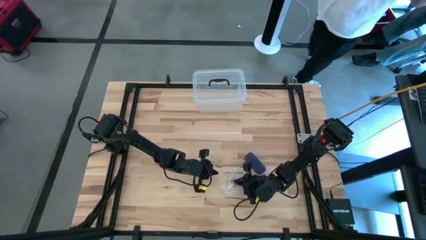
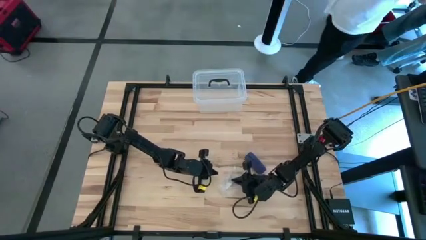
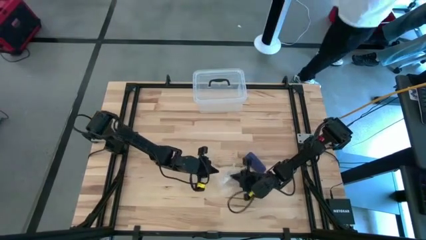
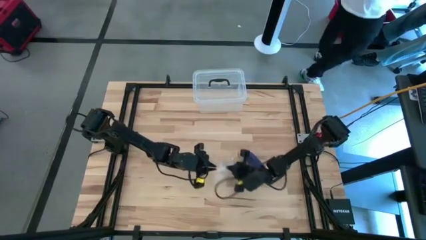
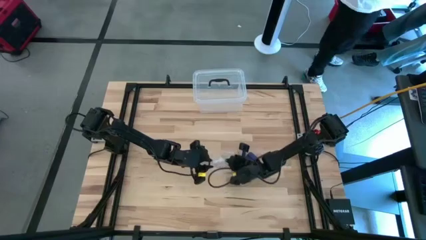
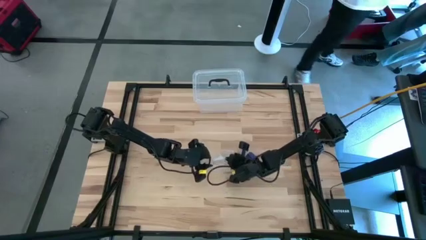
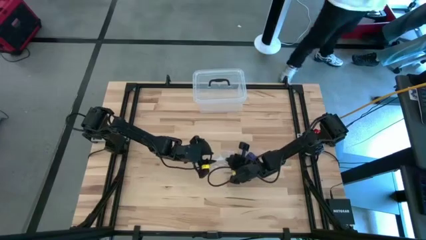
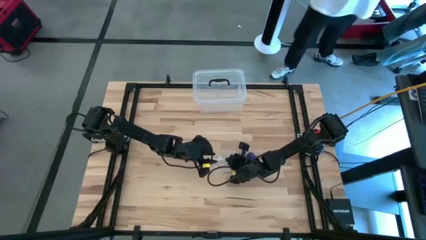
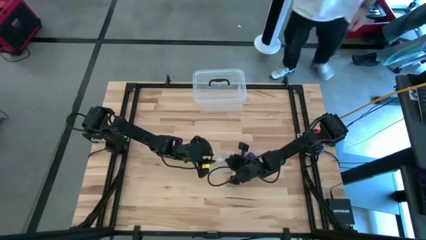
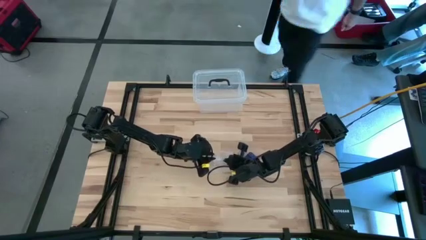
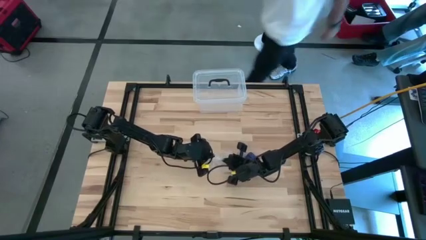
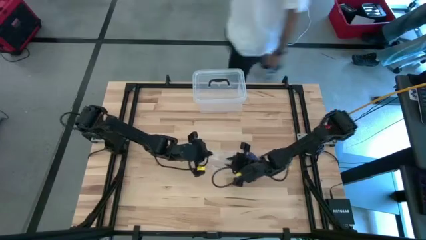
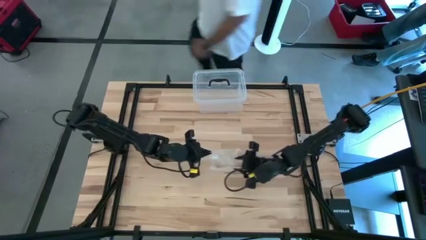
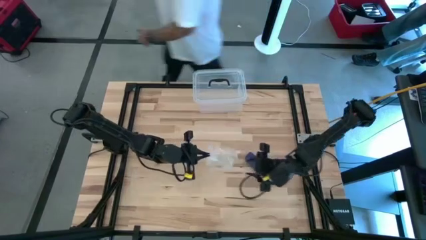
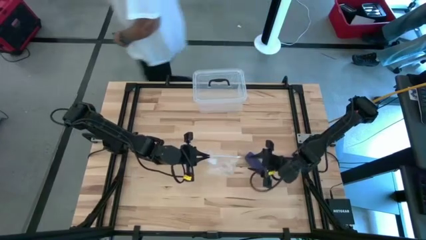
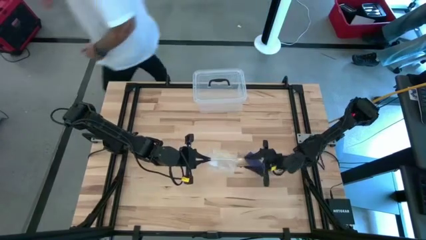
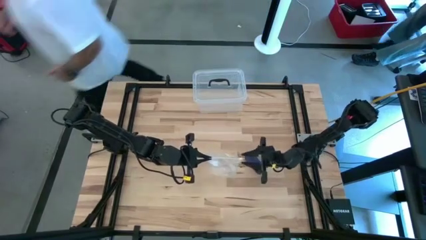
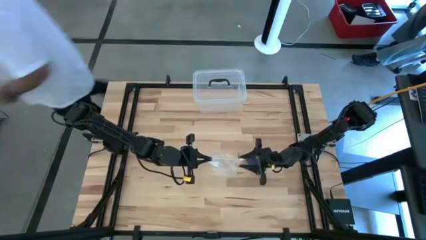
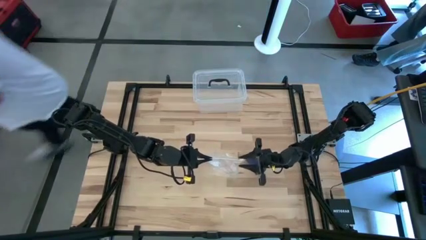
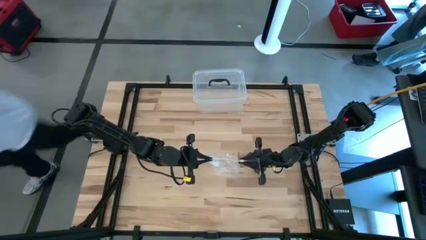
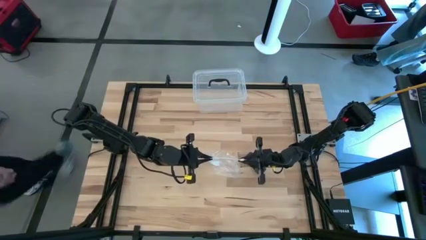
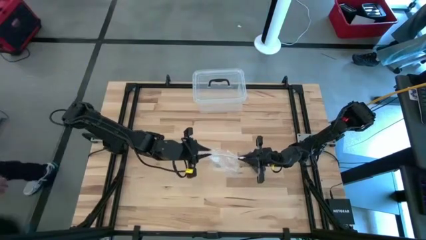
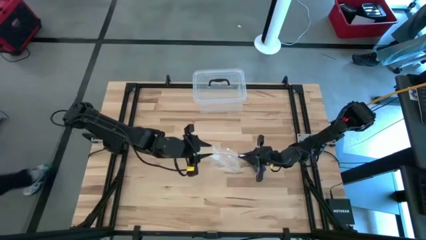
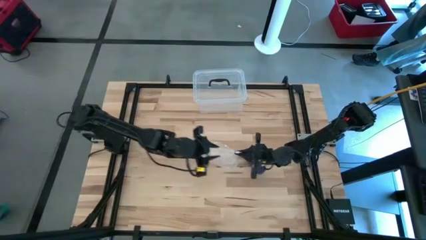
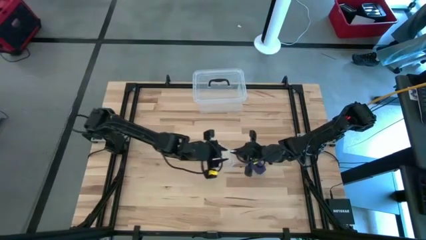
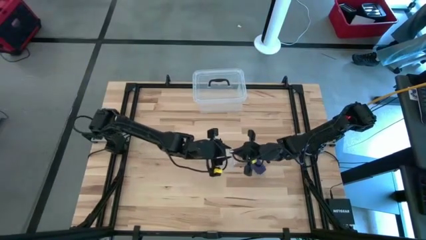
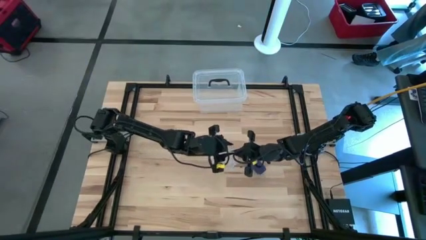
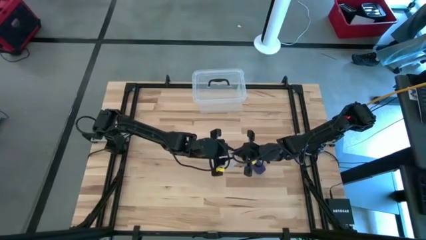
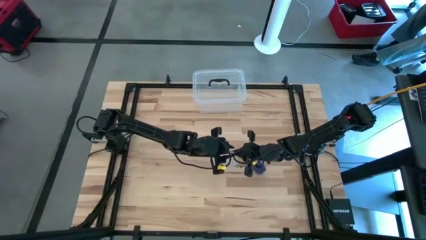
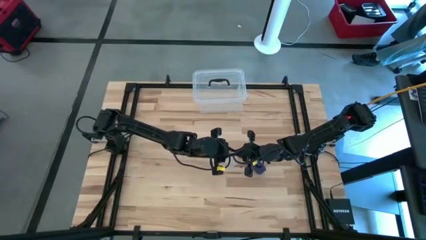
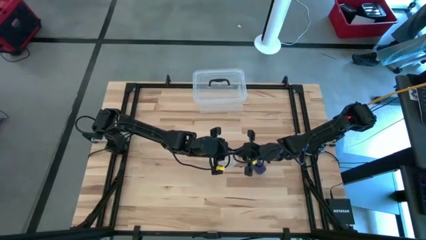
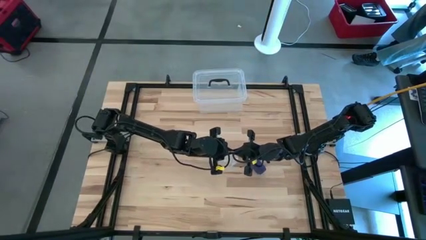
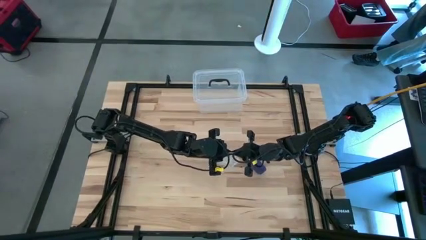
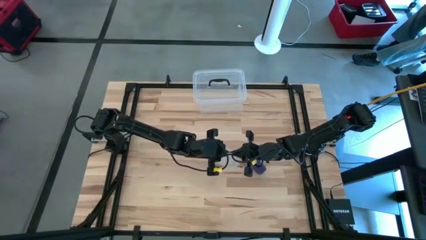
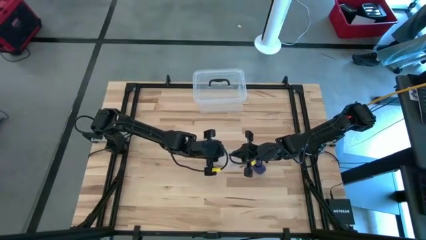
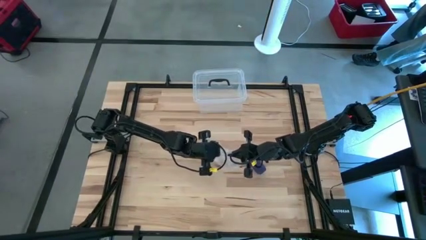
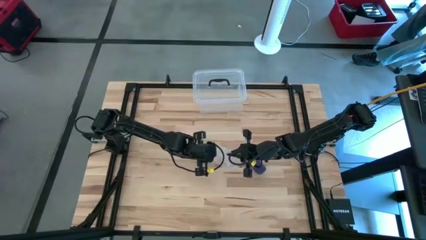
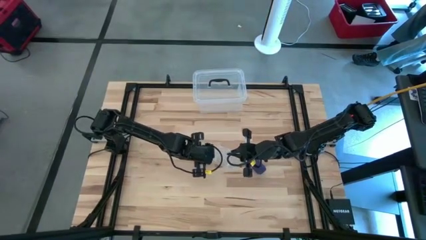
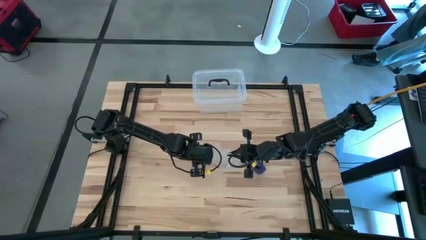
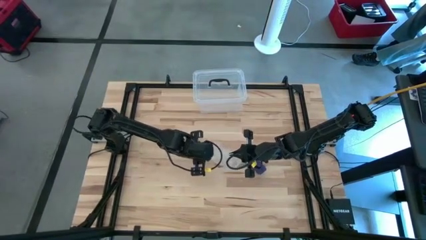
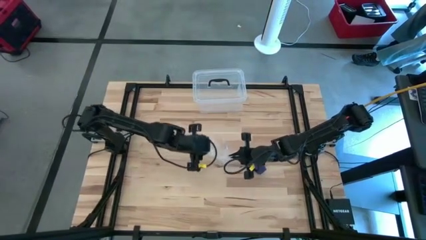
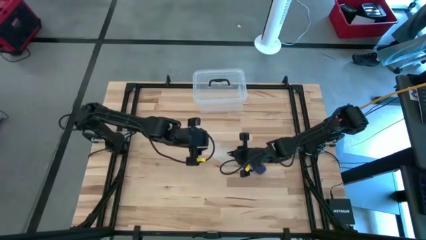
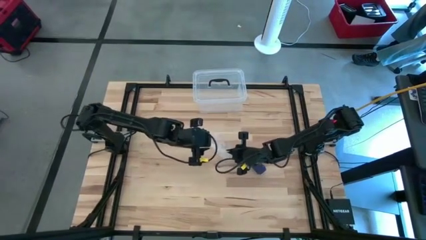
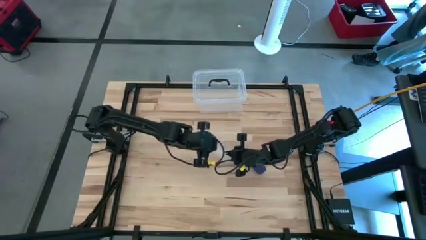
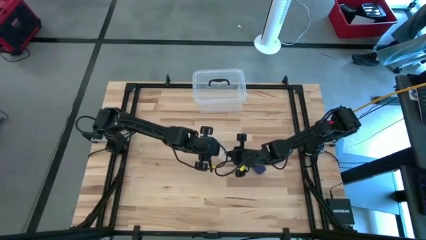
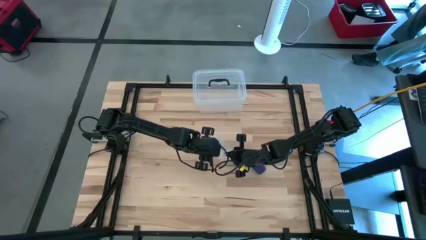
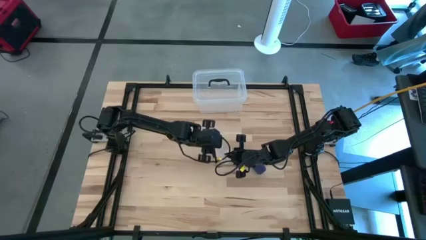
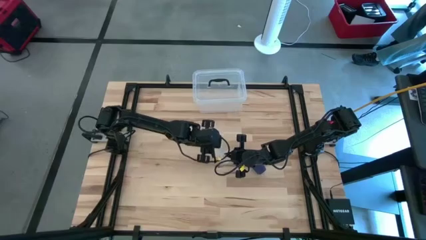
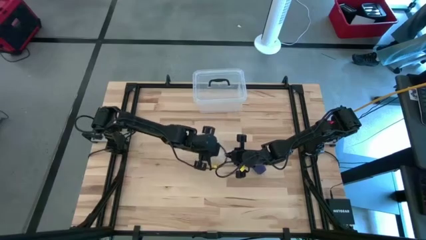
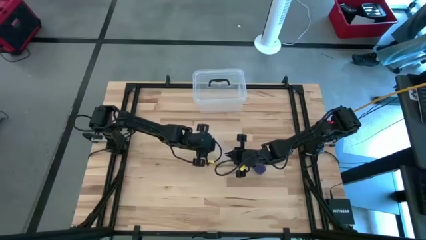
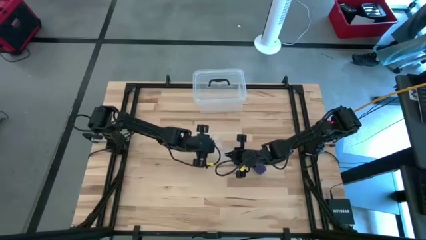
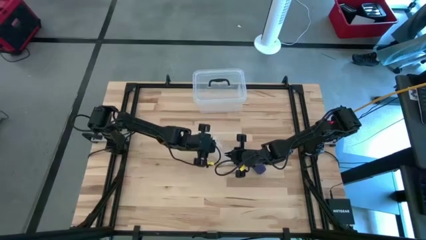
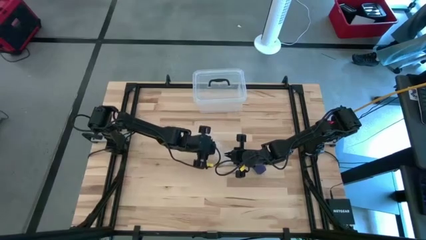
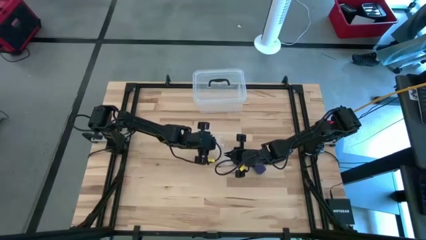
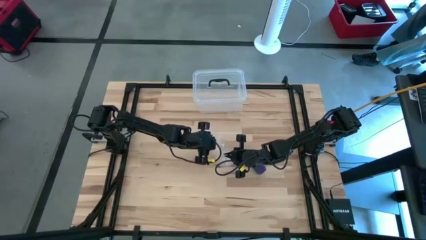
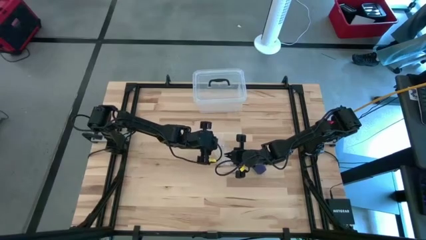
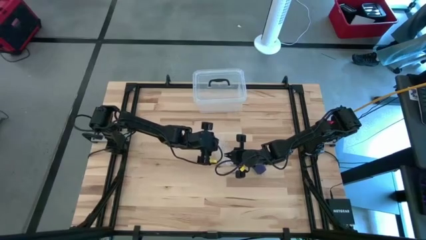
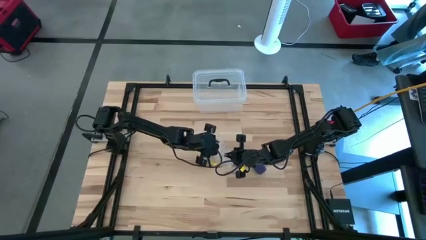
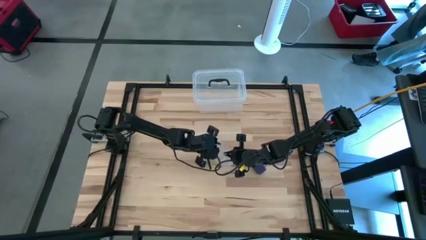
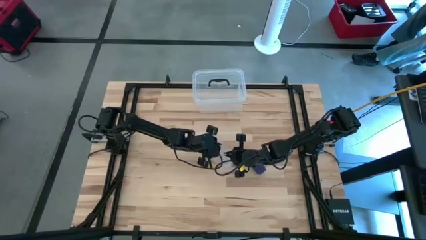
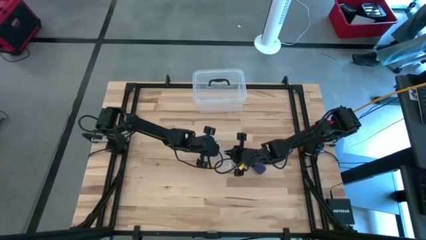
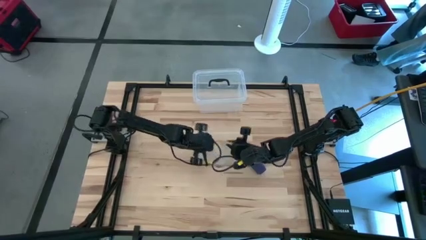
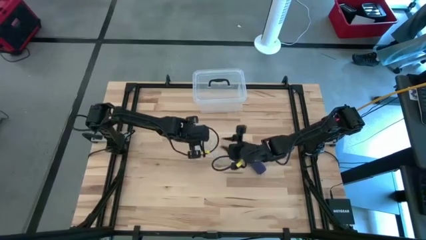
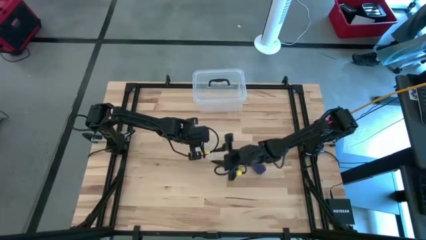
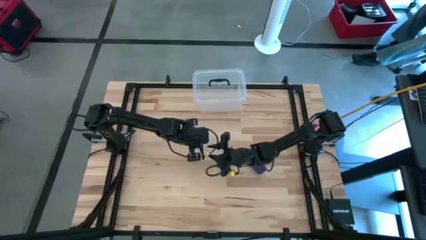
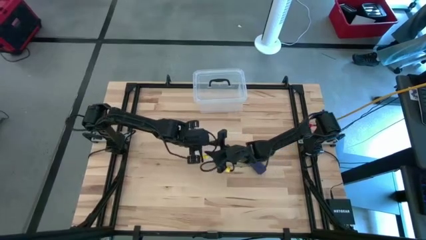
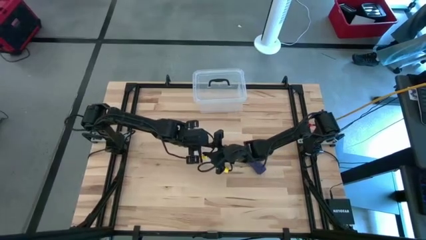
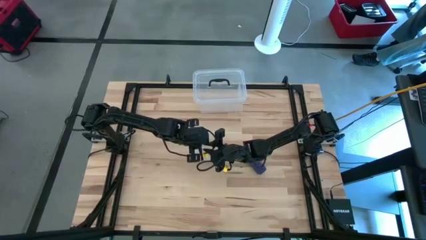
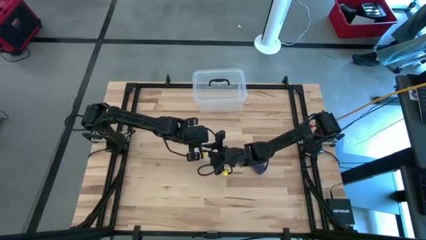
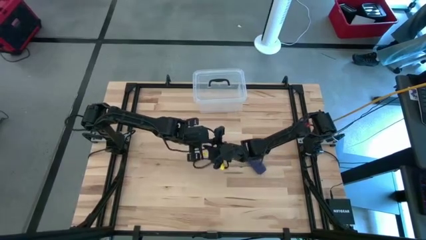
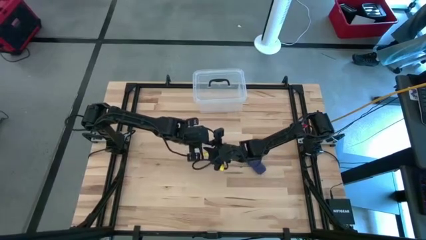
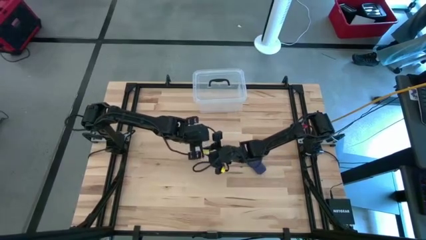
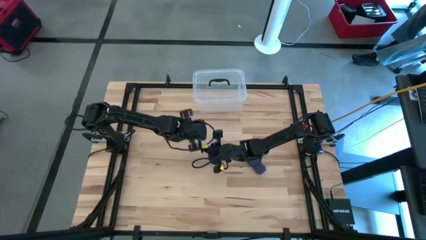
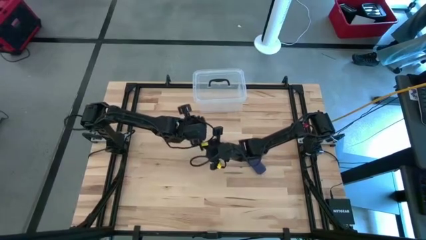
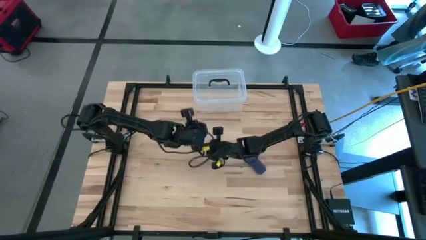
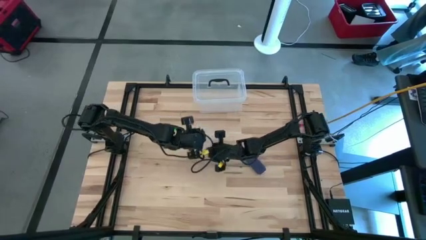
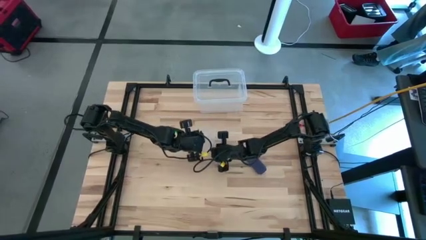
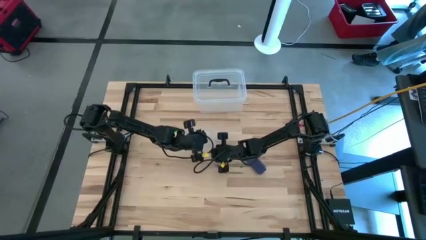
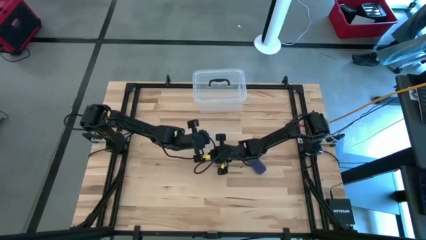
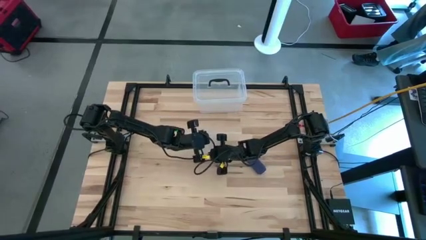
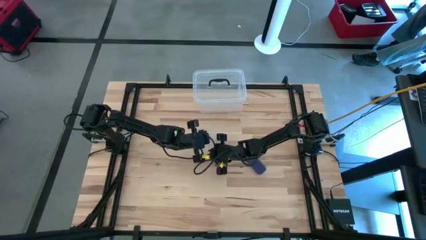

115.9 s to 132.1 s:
Task: Roll bandage
Open the transparent zip bag
